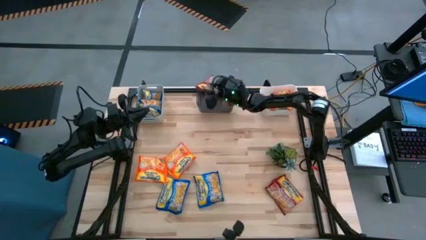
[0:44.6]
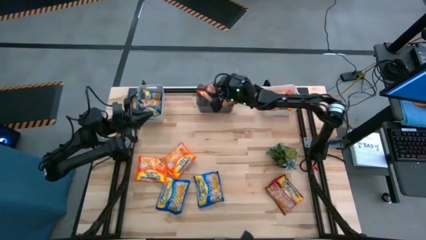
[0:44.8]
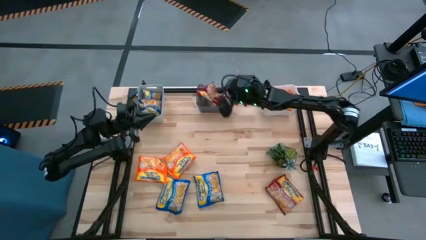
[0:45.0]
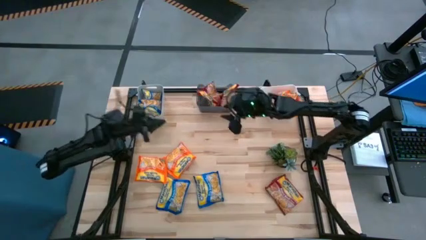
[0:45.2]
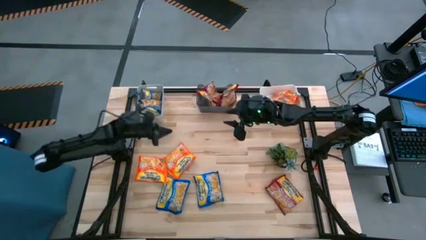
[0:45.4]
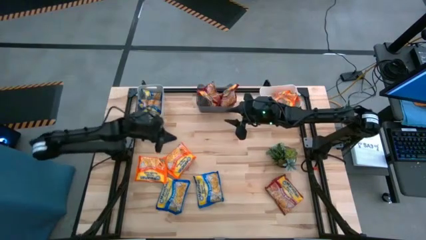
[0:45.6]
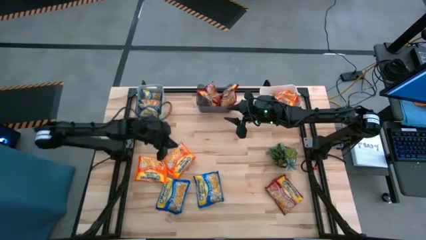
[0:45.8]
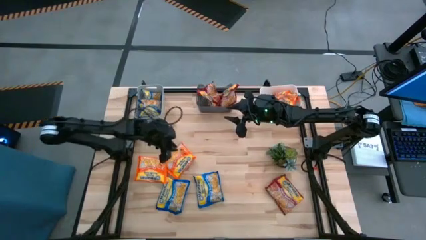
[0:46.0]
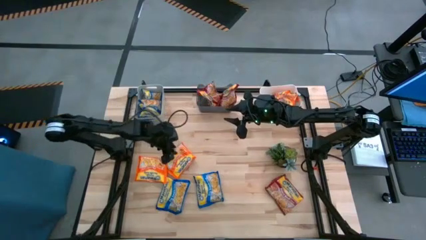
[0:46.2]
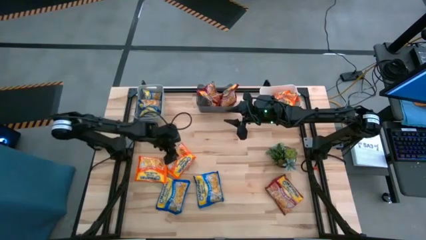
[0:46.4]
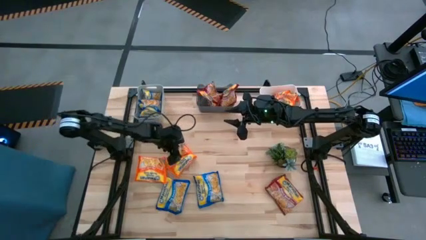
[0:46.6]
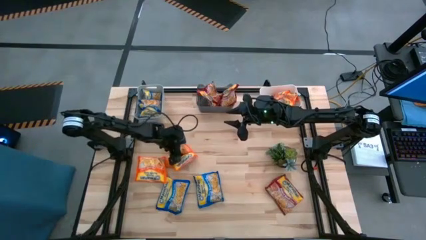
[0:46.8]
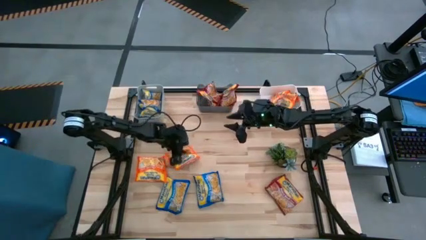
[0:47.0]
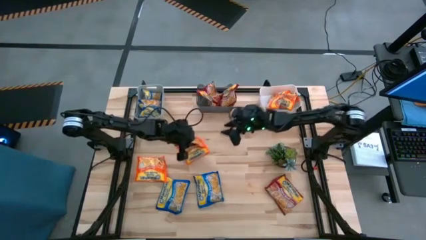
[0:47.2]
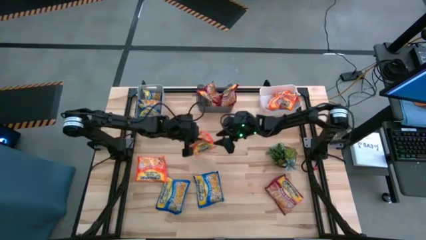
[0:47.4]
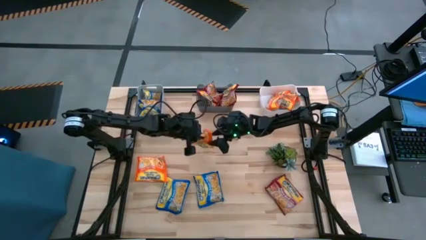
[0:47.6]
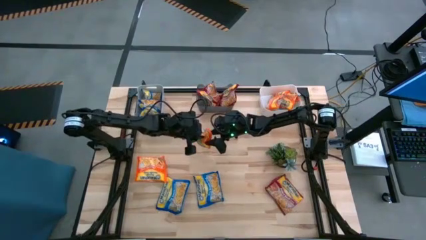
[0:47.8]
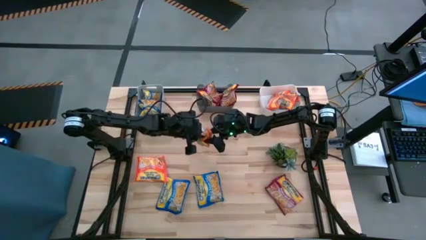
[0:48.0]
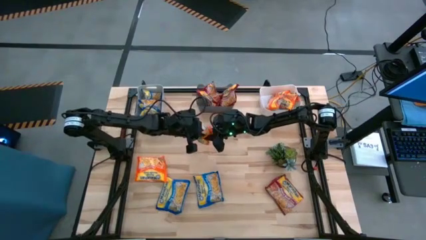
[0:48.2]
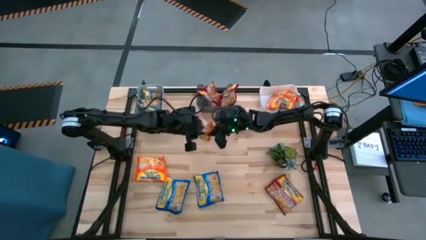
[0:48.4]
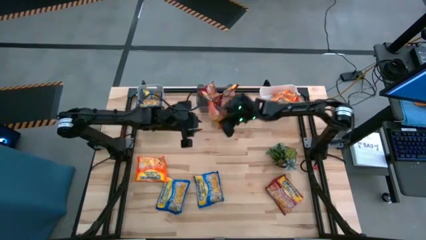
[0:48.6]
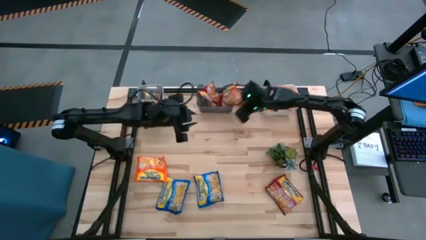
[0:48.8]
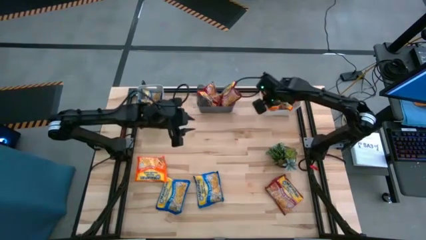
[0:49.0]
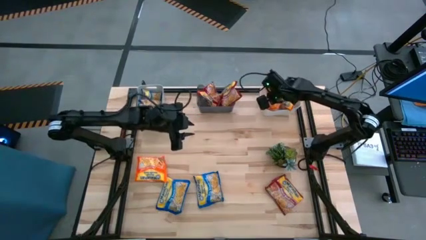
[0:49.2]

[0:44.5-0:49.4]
Task: Sort Maruchan noodles
Put the orange noodle pack into the white bin

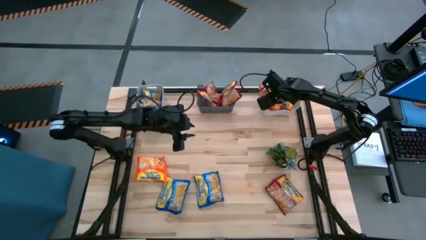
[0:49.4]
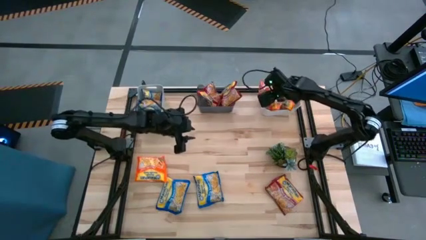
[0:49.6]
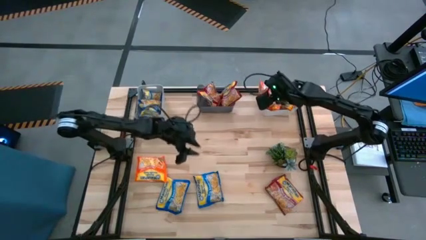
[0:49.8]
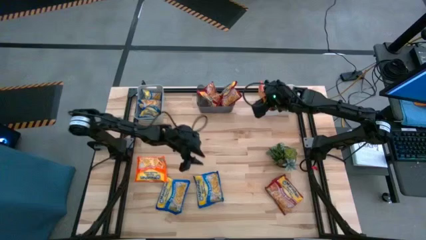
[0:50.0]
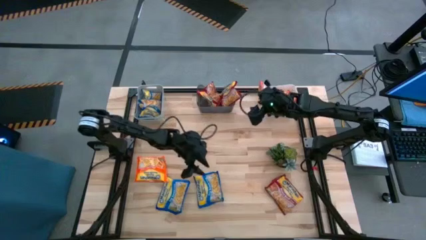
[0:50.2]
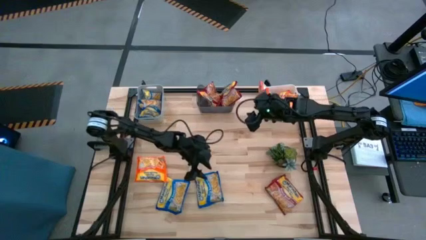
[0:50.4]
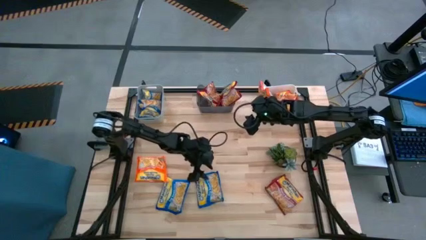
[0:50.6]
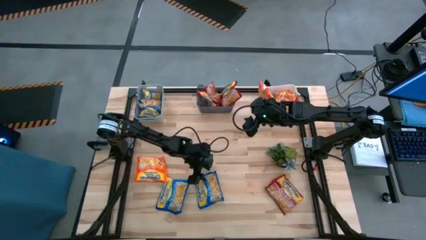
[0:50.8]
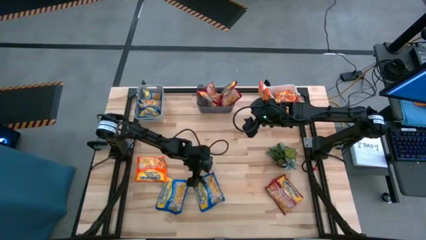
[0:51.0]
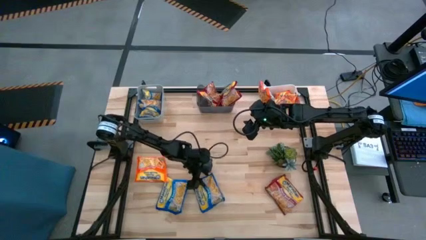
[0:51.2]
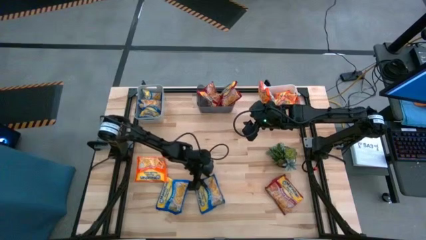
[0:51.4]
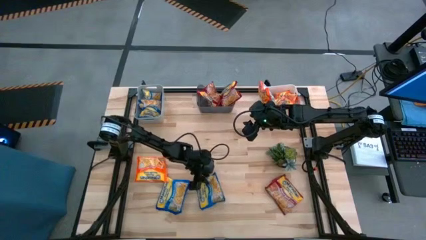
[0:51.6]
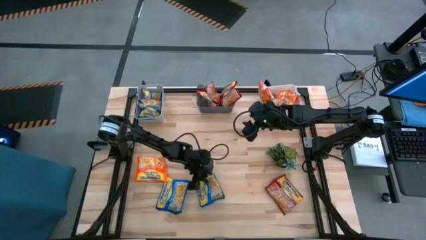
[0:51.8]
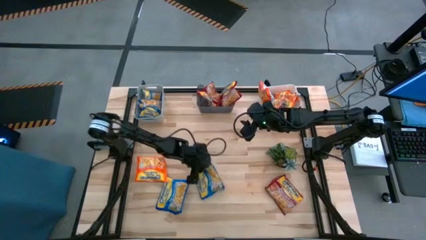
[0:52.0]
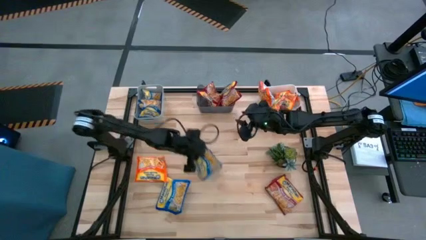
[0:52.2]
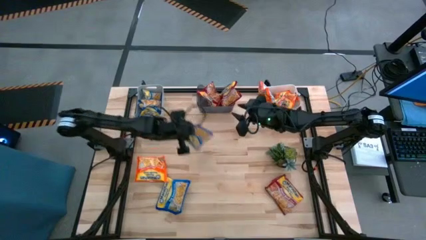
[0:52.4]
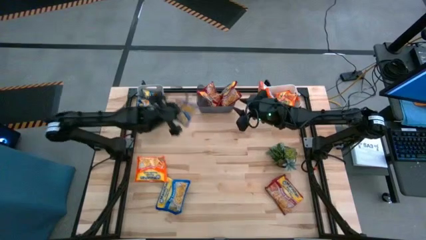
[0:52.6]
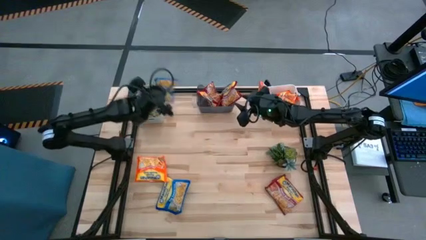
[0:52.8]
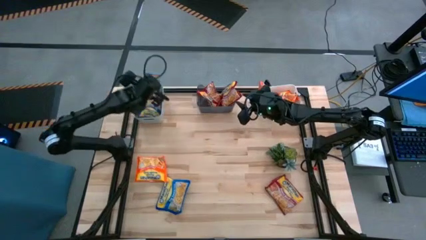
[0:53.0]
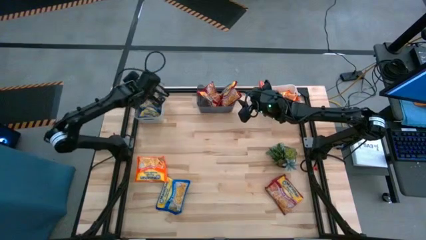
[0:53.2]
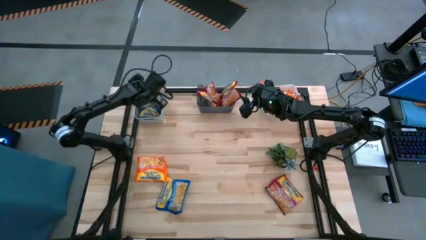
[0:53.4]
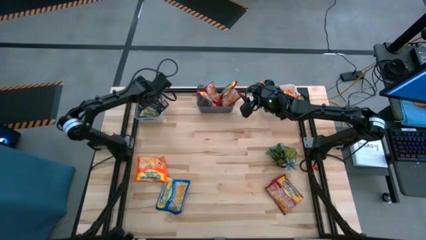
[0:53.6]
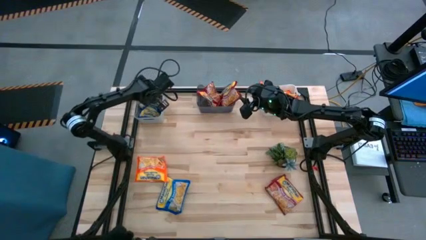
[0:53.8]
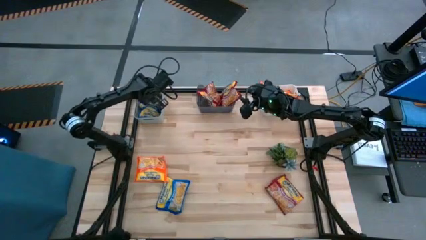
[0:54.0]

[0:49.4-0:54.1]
Put the blue noodle pack into the gray bin

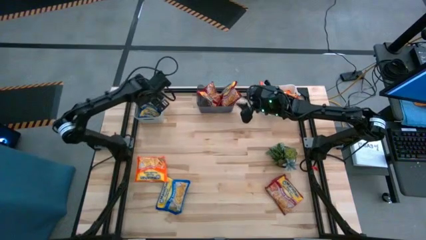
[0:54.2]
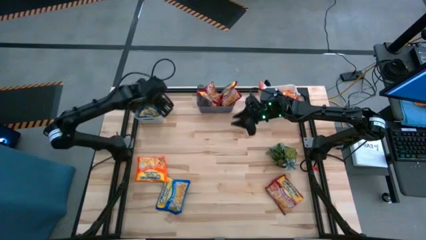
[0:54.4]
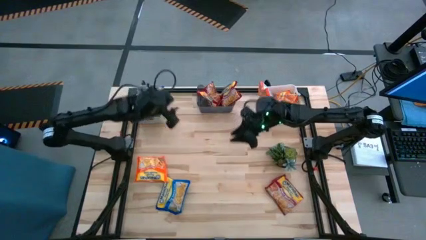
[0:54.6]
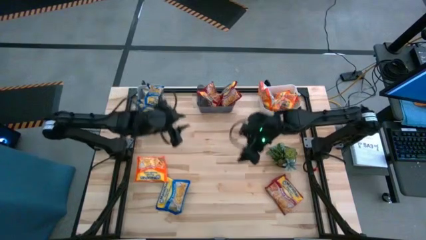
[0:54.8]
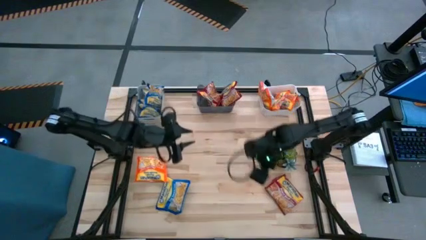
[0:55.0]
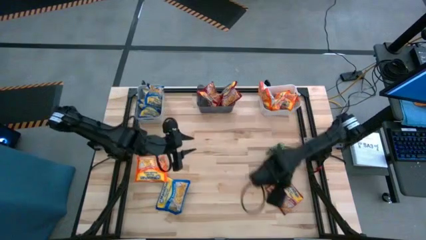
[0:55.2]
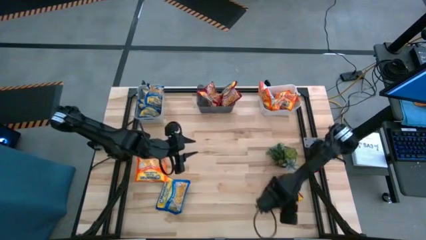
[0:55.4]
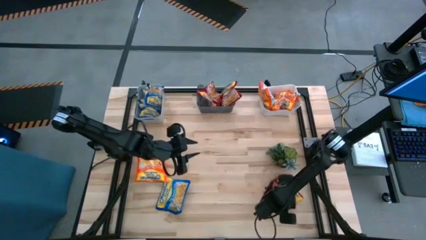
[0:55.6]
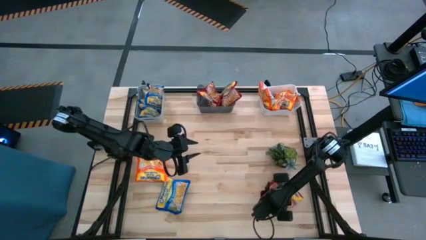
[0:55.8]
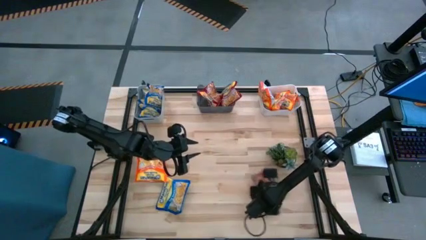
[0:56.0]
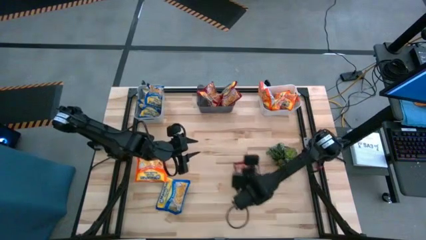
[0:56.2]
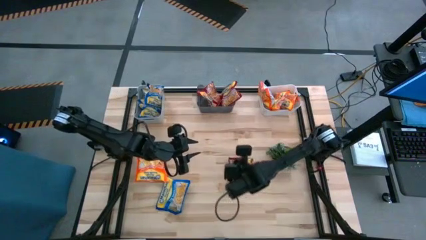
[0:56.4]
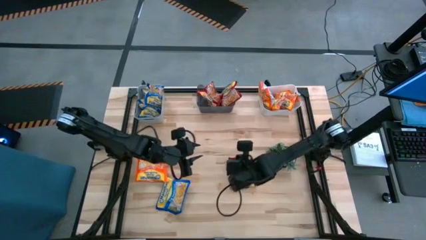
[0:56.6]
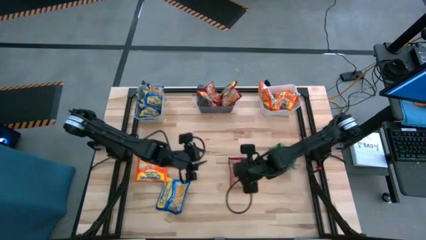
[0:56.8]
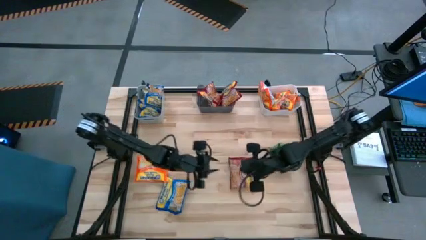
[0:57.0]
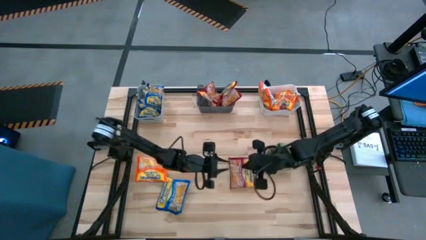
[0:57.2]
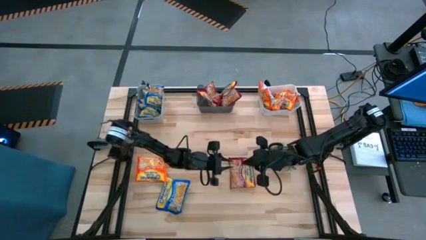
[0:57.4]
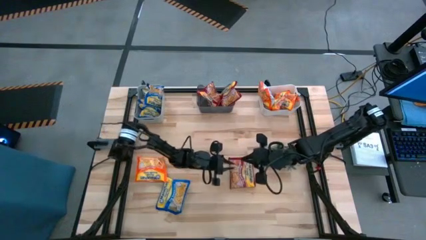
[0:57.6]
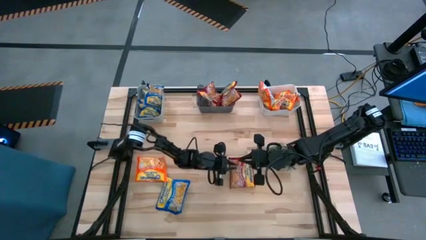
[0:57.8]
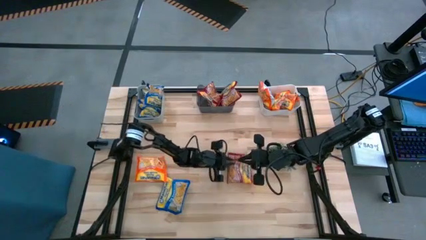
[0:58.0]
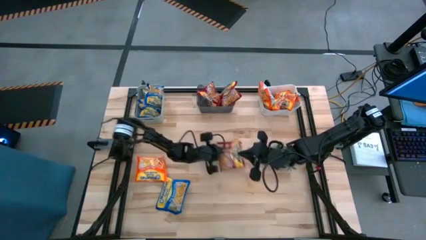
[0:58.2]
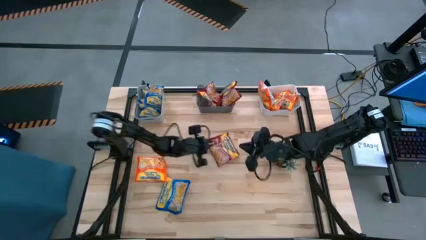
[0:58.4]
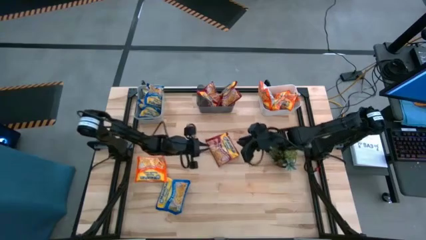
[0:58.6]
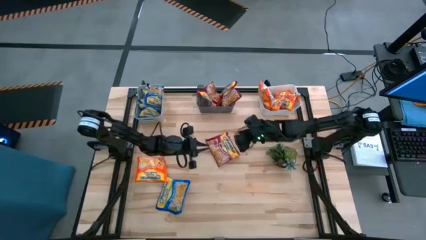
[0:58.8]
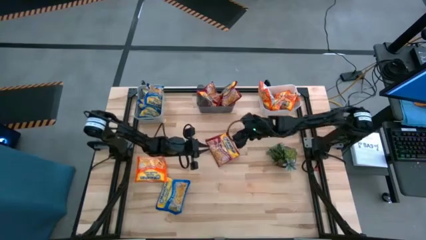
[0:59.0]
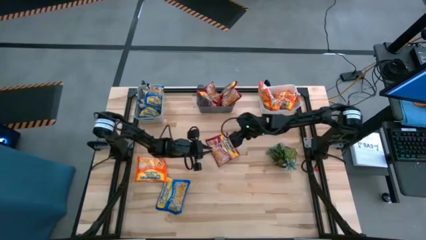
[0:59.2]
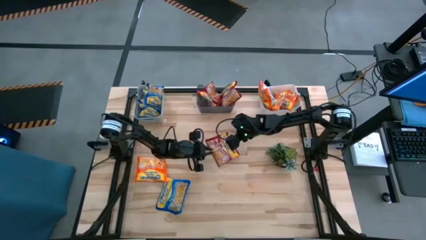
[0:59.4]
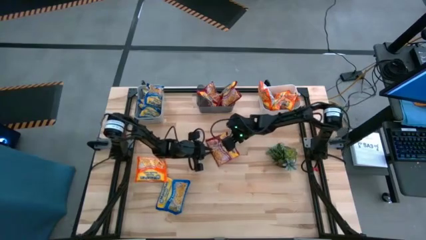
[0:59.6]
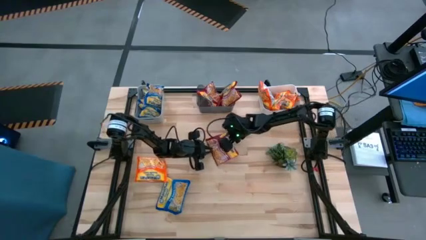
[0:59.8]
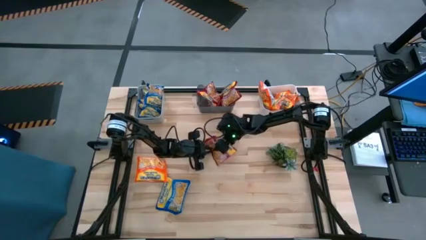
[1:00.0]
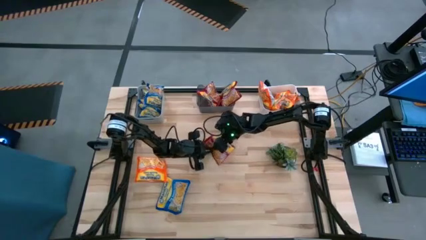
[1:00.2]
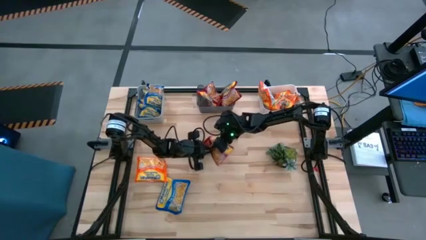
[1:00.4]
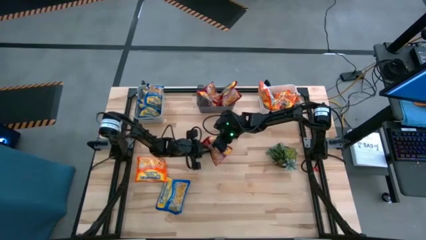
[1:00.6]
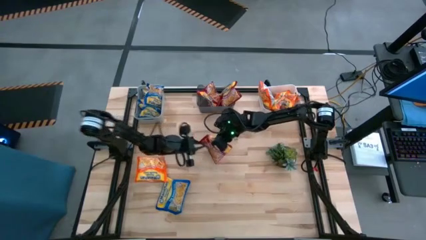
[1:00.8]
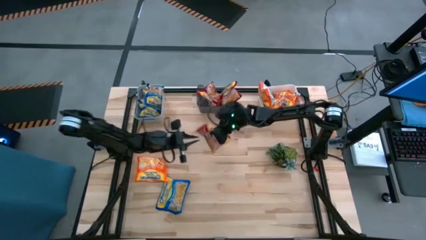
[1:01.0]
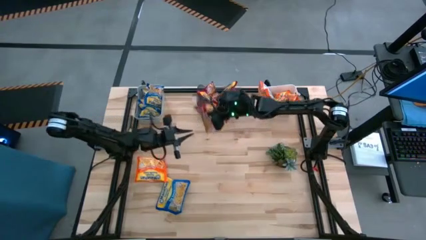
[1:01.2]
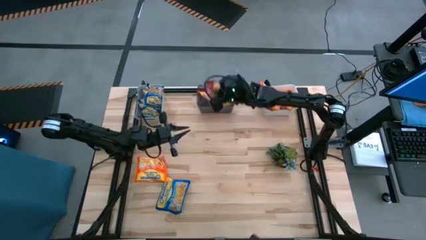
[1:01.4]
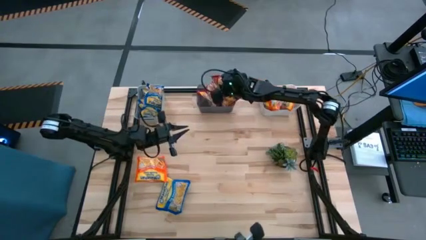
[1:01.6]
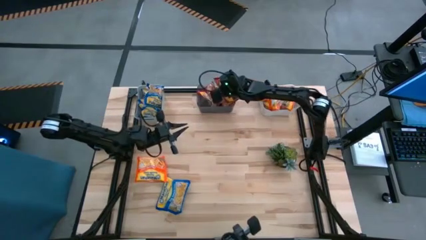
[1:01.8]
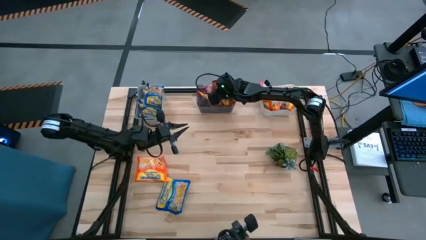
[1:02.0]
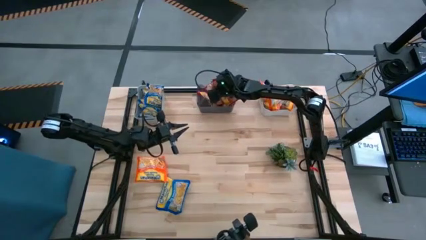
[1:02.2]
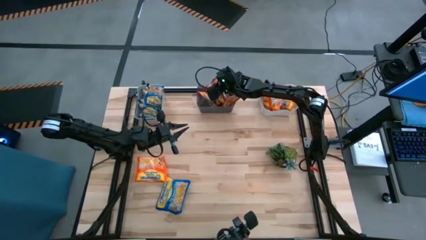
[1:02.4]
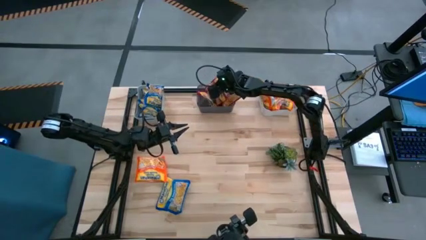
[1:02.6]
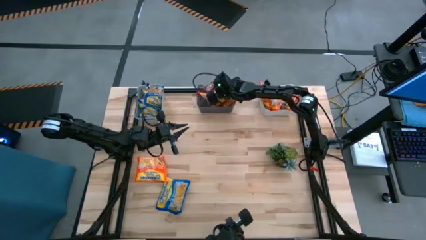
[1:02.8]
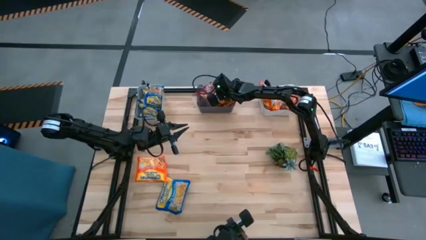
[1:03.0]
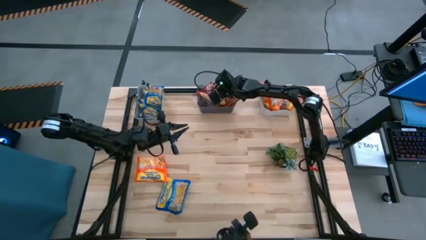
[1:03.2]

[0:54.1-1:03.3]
Put the red noodle pack into the black bin
